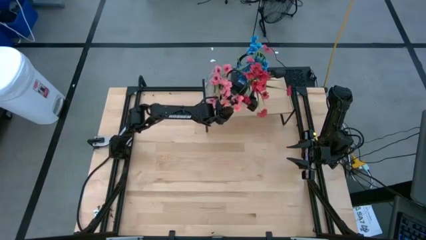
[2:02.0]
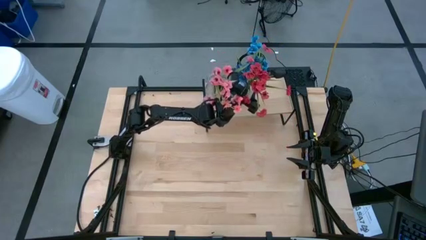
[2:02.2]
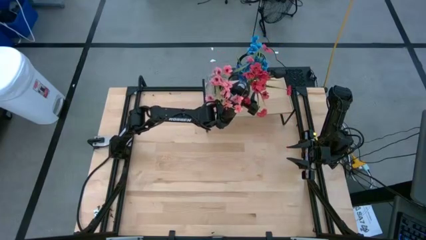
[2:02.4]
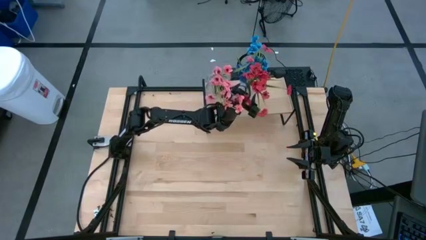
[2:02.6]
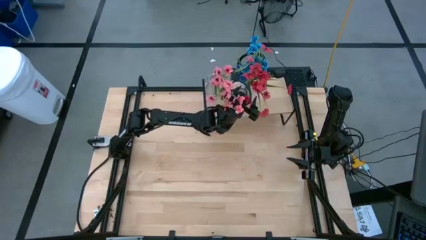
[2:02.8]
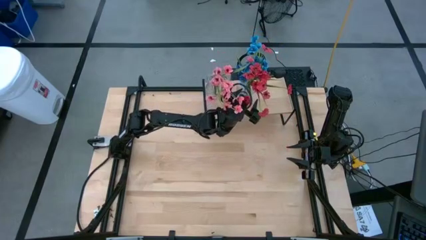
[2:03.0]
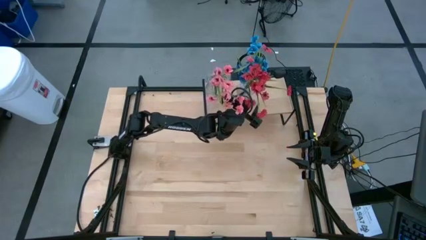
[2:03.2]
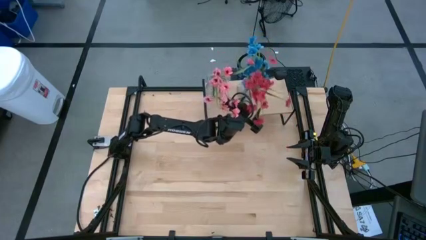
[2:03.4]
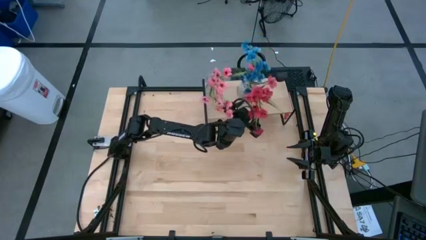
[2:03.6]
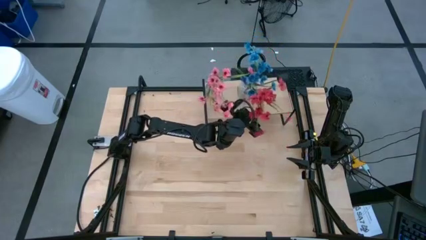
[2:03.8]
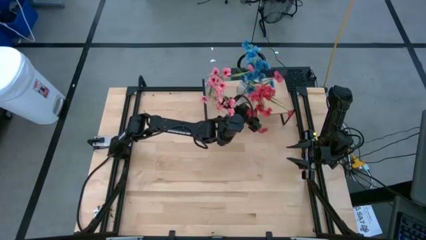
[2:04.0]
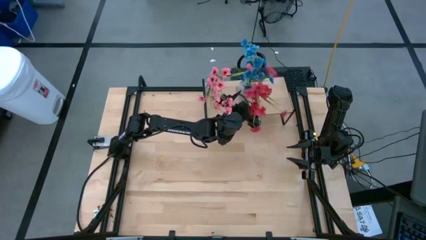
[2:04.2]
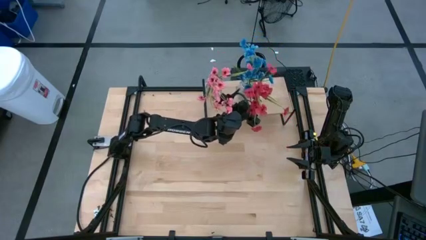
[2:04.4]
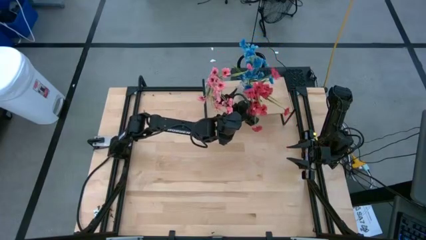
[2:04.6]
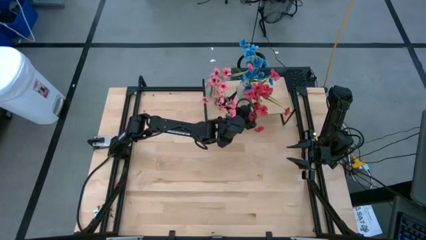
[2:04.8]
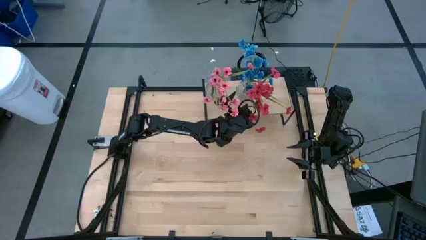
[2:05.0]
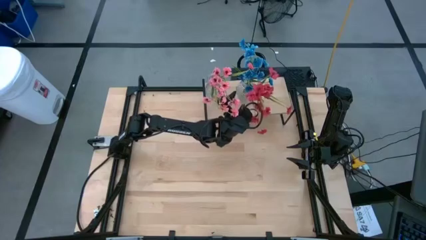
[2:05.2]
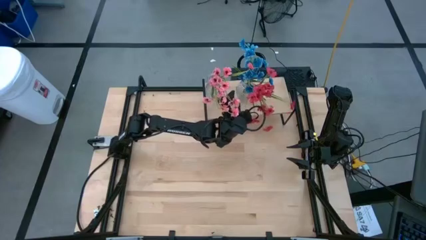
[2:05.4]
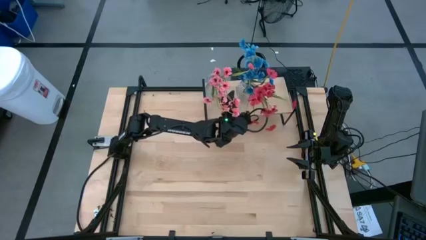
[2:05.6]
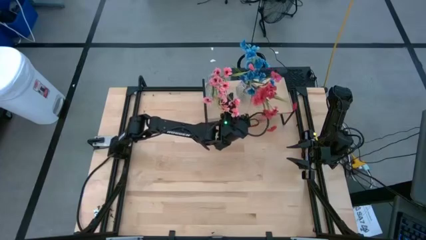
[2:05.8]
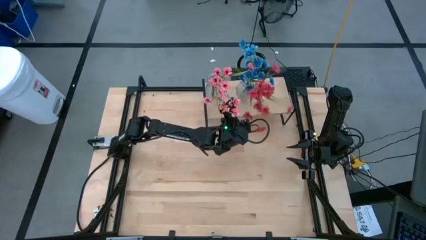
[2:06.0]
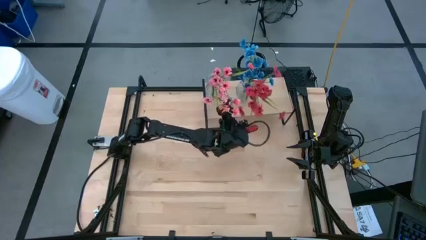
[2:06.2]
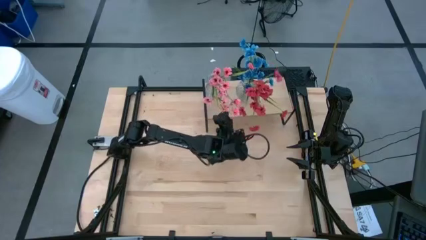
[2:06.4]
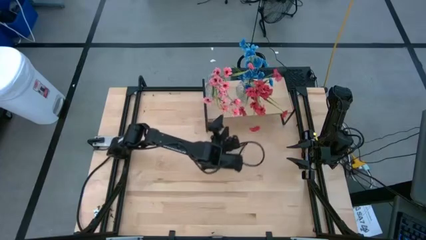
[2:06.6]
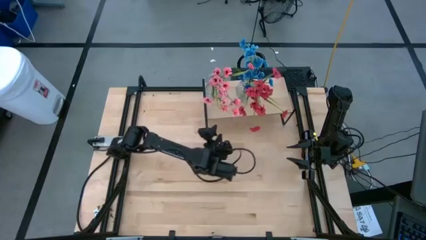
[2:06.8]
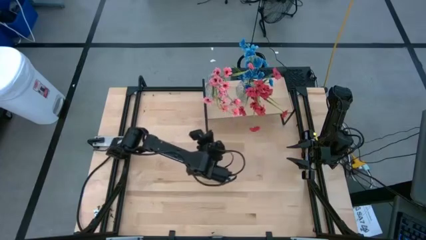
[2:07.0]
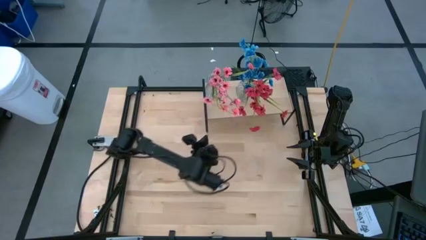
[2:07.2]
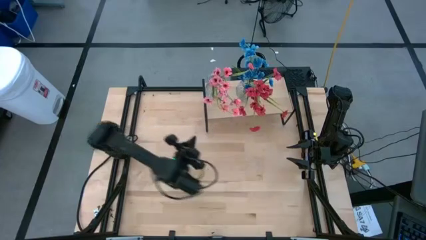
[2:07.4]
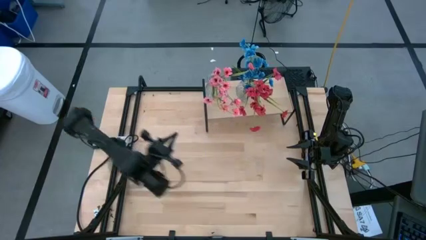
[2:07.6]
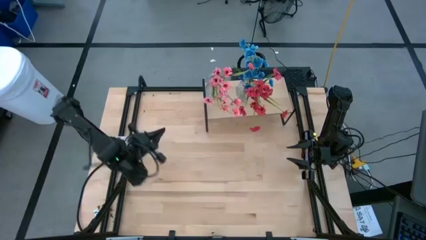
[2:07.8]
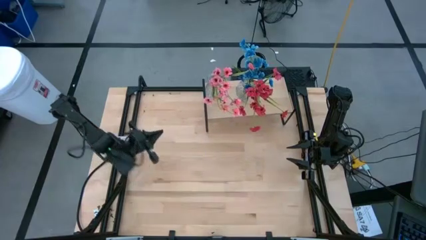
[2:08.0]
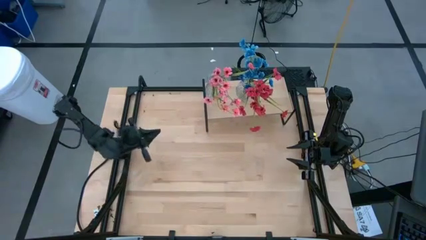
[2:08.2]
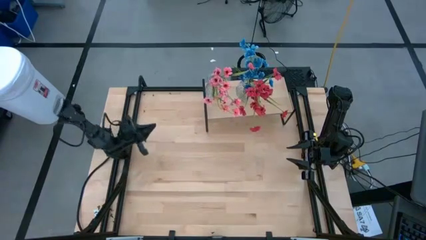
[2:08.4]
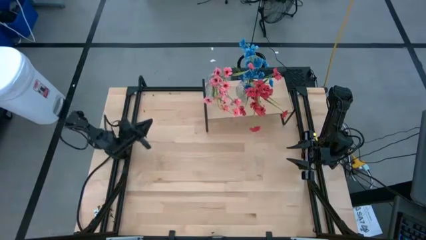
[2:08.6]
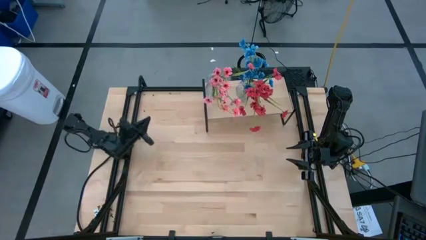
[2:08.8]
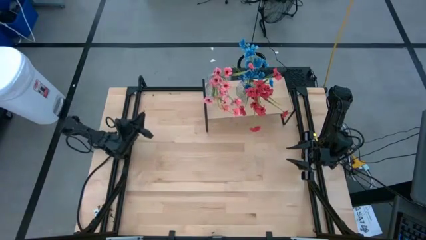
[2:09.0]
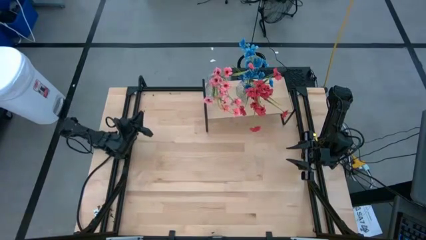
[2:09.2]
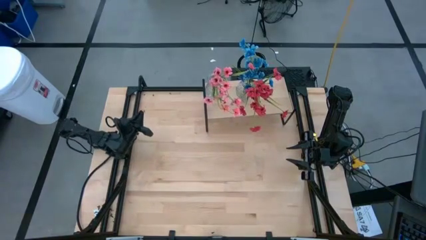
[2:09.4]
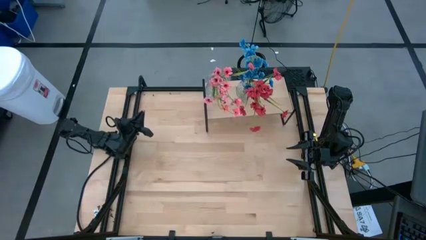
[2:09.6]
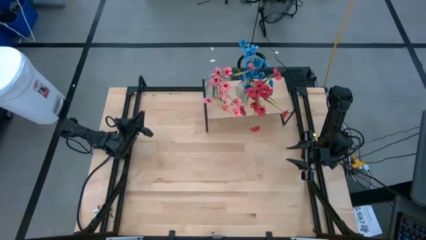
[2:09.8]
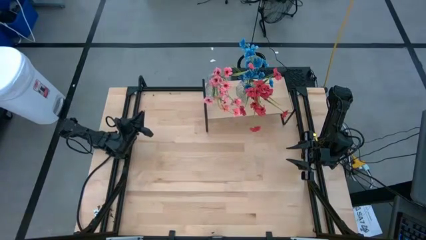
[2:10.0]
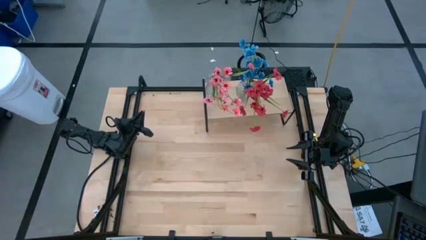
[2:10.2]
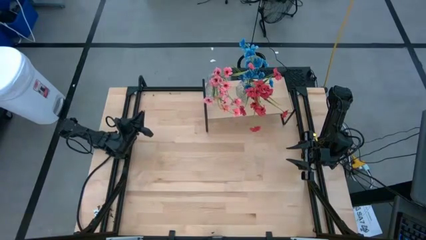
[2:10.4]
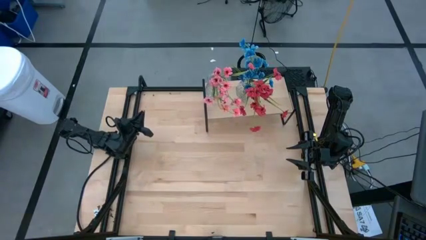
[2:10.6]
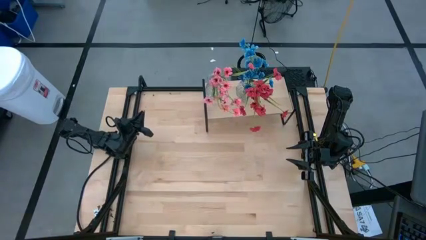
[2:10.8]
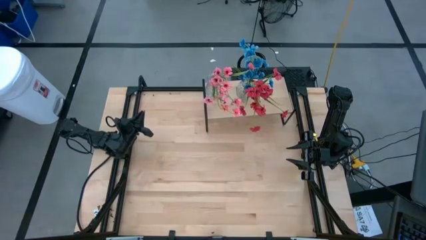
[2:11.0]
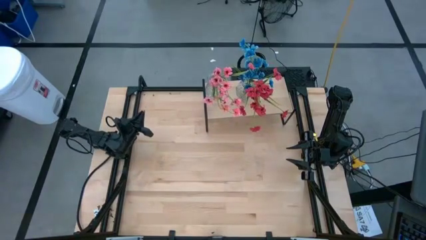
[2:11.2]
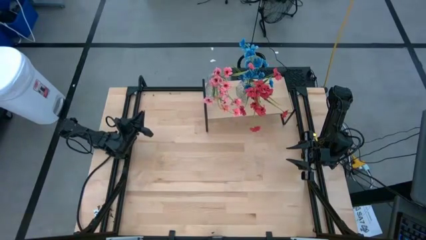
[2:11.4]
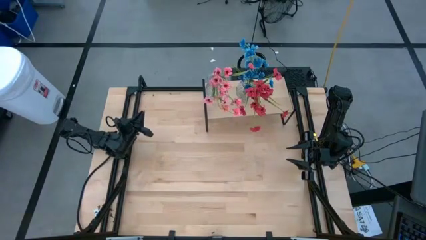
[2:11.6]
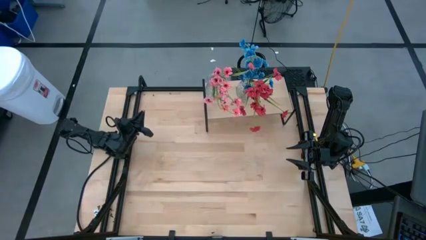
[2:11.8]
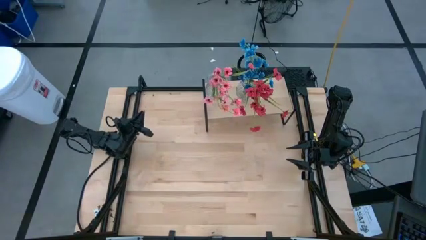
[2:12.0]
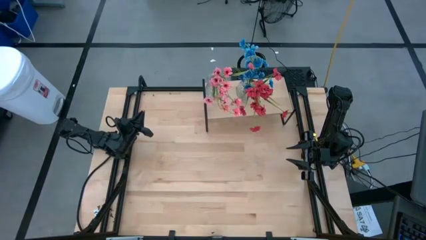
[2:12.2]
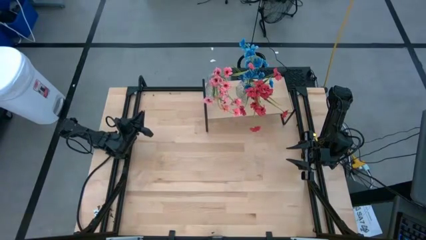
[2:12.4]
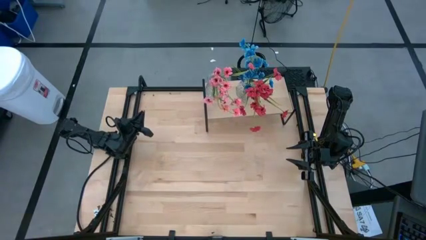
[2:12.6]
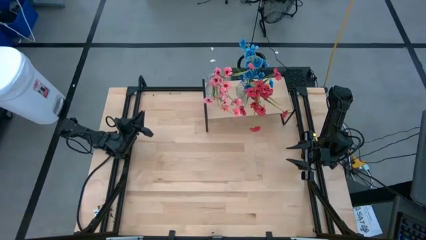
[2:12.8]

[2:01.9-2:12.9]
Task: Pick and place flowers into a vace then onto a shelf
Return to Home Position

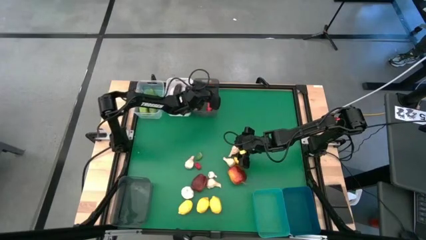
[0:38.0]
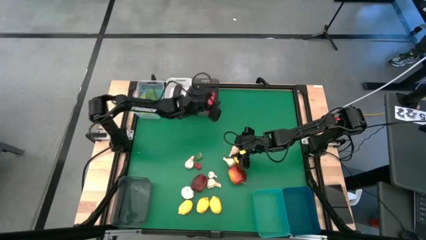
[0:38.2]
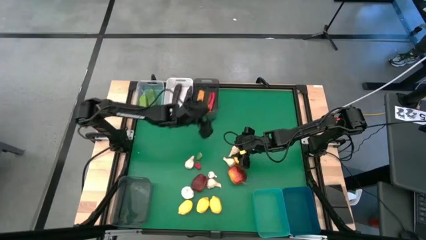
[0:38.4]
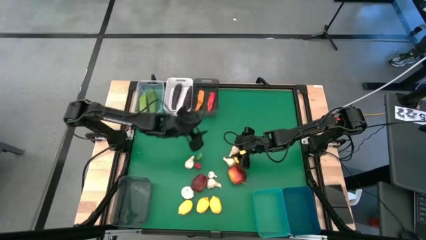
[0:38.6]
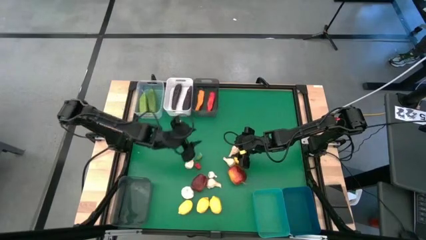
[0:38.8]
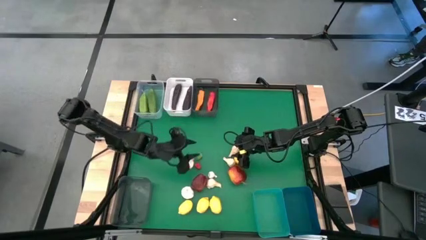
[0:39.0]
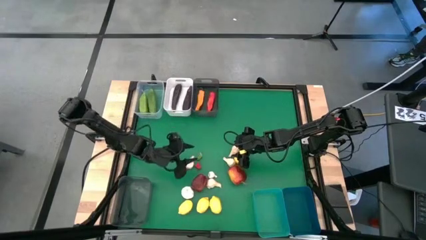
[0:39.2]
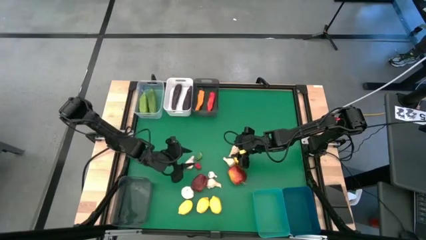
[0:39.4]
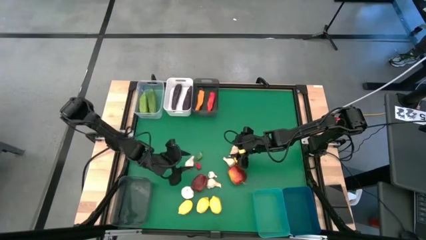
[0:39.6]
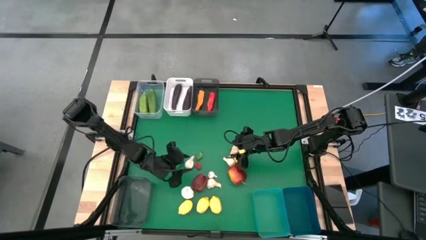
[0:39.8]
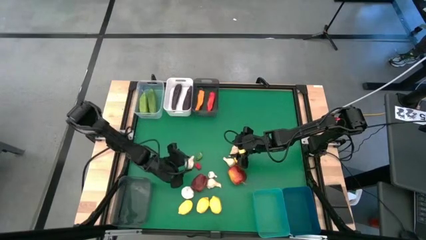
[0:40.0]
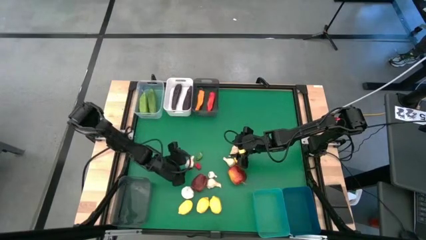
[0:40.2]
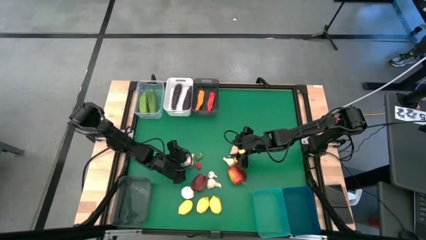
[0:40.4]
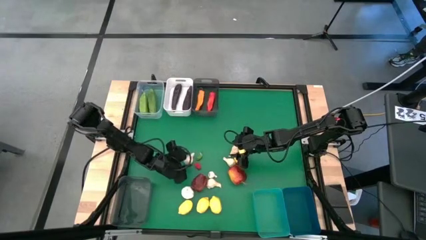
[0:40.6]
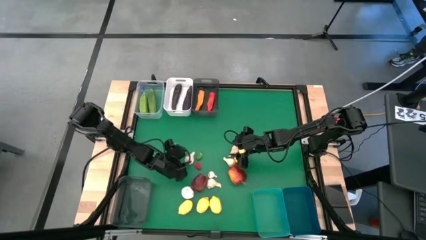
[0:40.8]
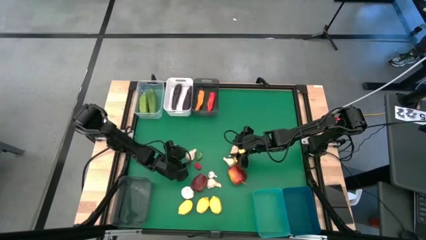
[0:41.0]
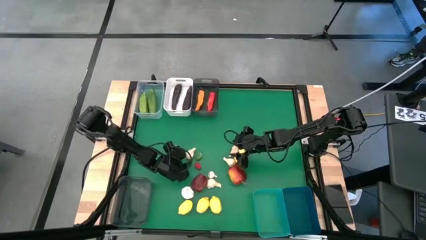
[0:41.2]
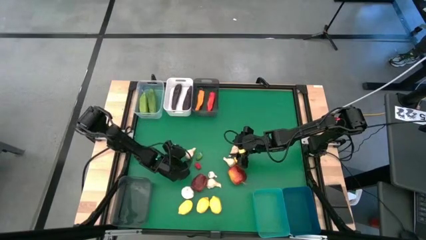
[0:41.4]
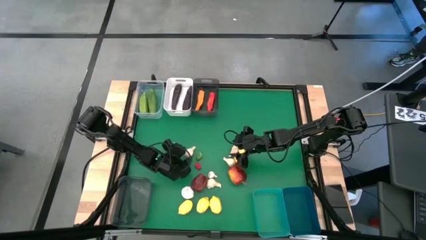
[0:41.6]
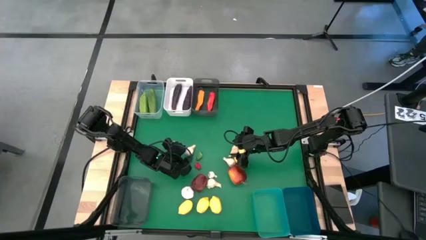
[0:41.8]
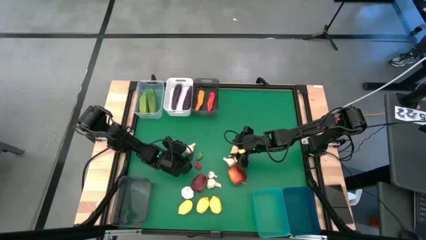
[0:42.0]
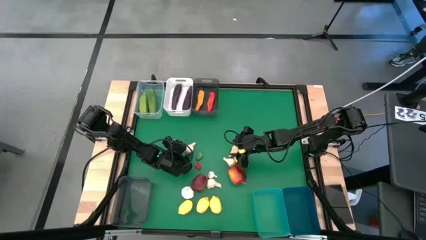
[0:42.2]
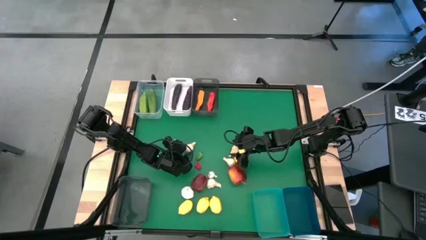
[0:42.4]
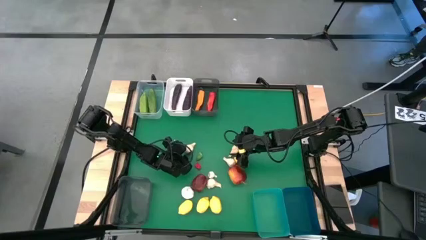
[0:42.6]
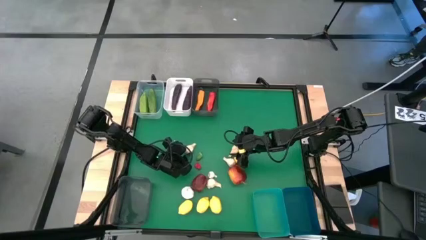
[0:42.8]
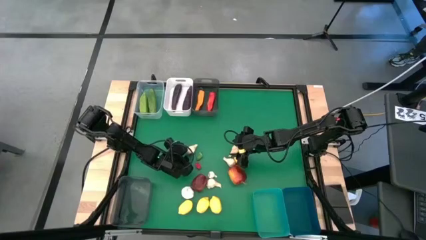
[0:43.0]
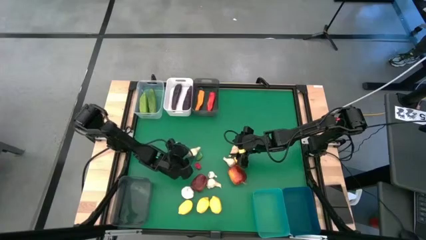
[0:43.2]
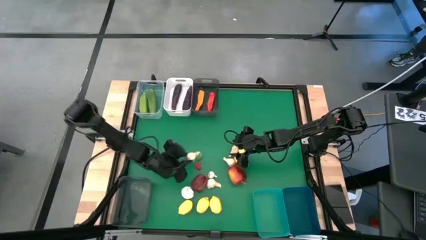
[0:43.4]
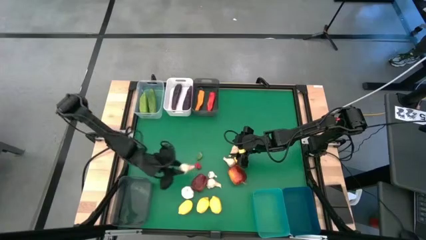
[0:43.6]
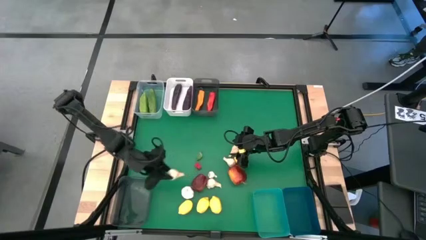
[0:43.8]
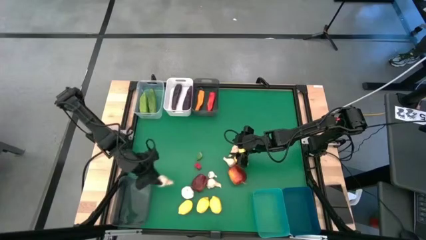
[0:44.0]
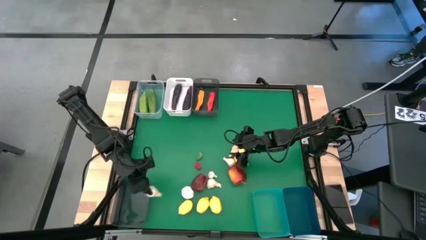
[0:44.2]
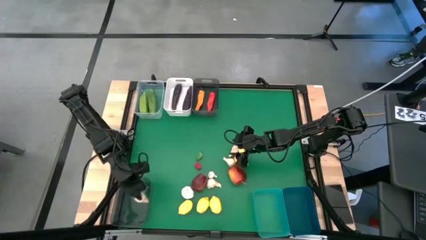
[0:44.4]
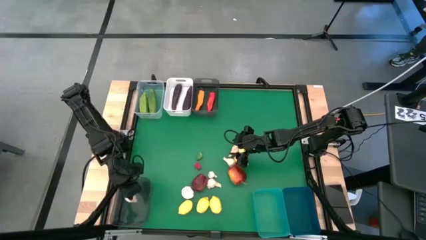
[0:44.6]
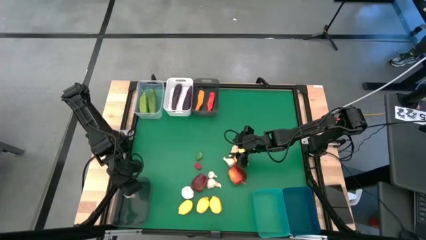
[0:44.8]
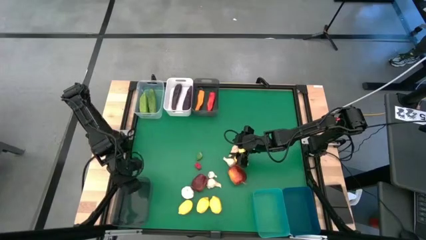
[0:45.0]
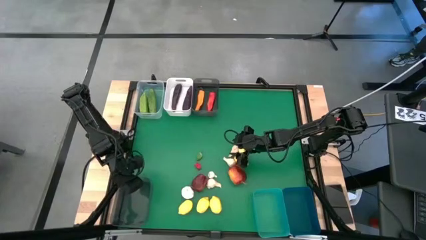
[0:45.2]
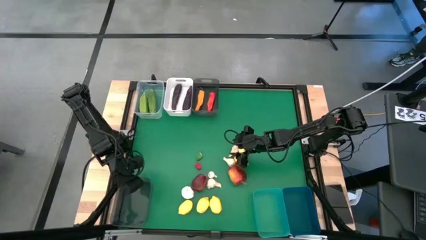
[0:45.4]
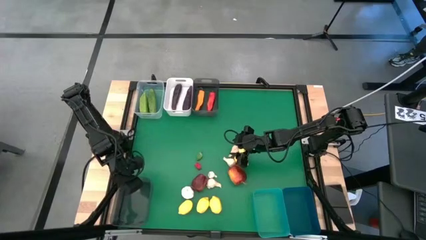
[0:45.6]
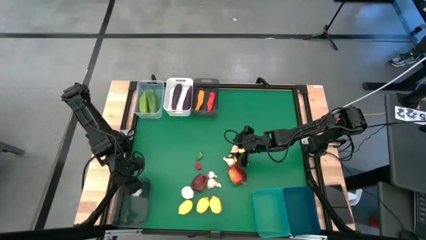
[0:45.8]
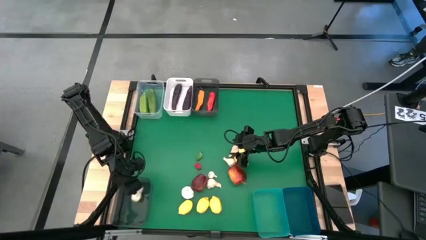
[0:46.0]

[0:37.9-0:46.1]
Task: Sort produce into baskets
Put the white garlic into the bottom black bin
